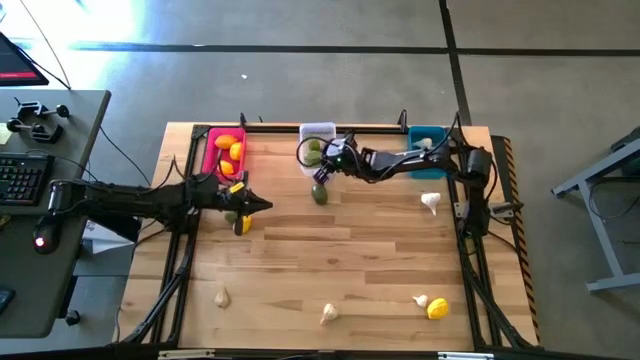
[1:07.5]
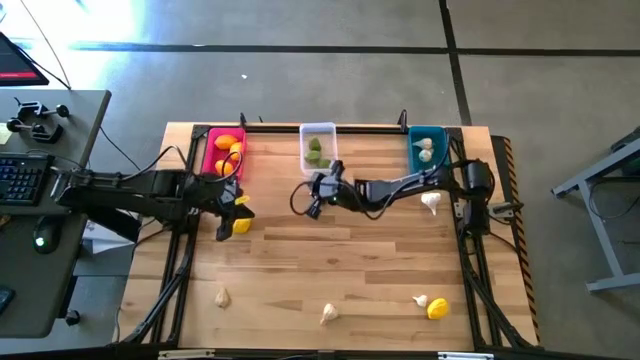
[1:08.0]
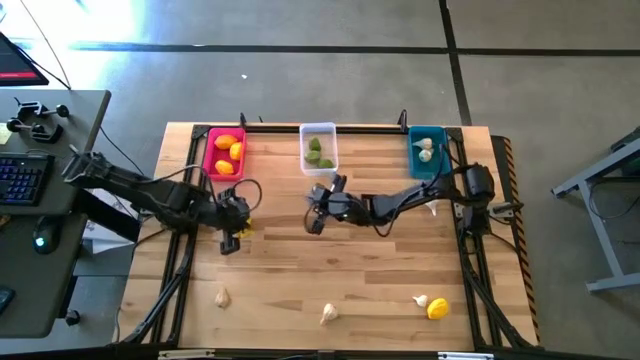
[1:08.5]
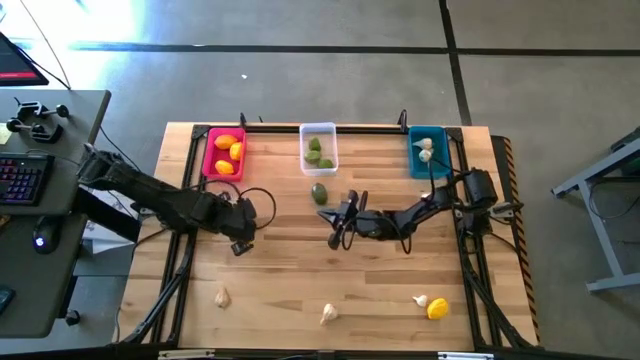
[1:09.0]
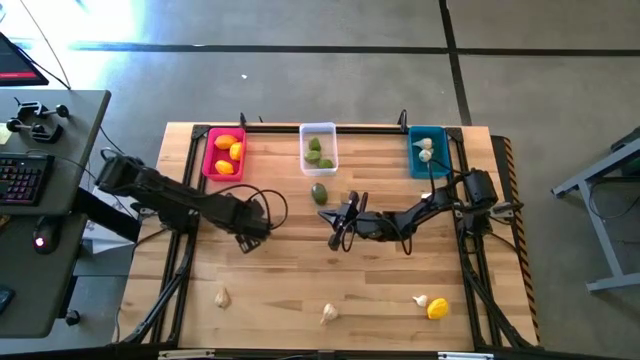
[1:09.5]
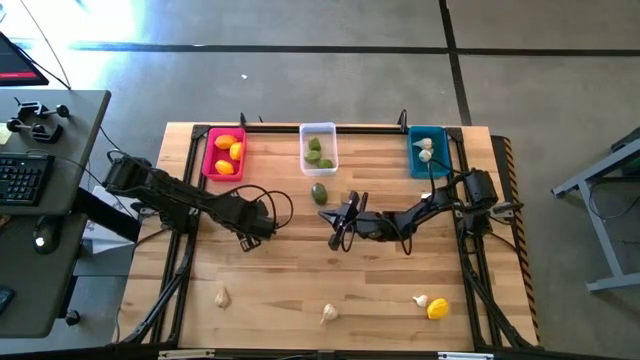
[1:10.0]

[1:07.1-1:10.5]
Task: Sort produce into baskets
Put the lemon into the pink bin

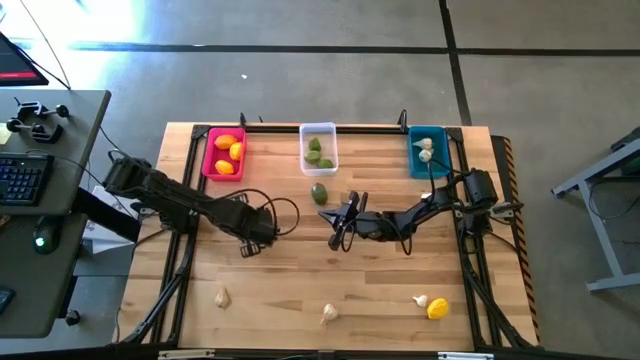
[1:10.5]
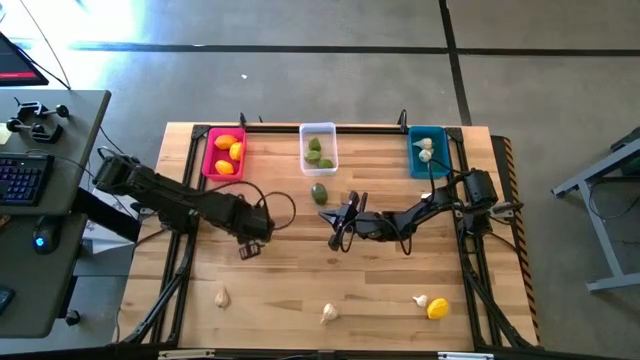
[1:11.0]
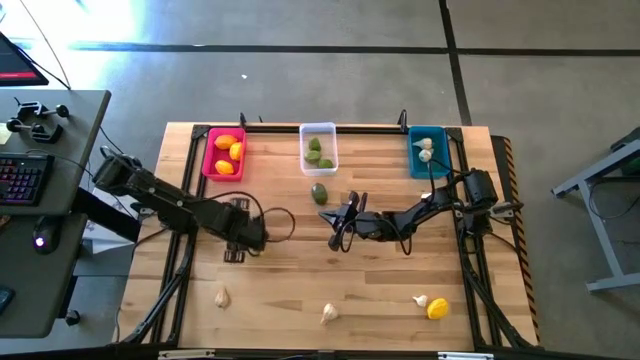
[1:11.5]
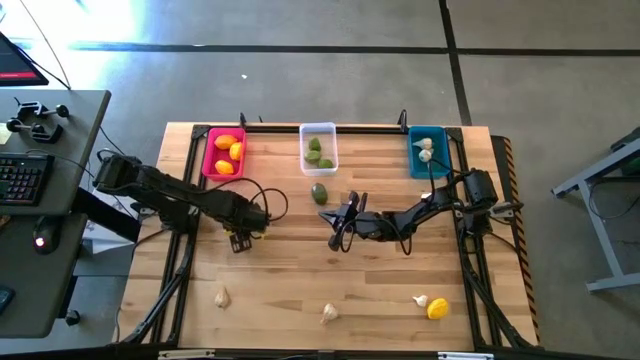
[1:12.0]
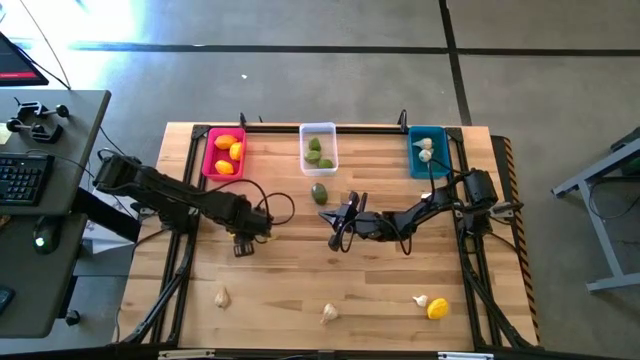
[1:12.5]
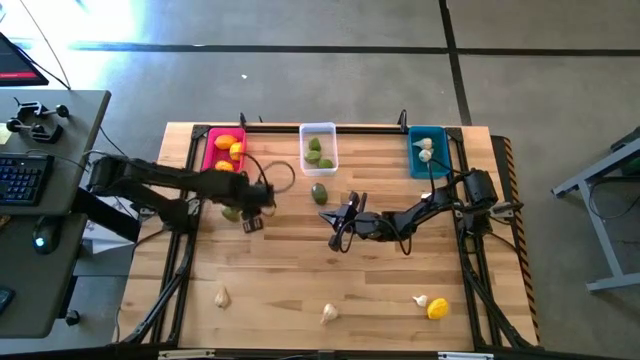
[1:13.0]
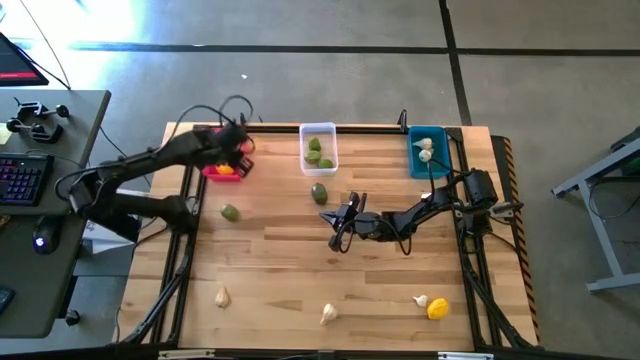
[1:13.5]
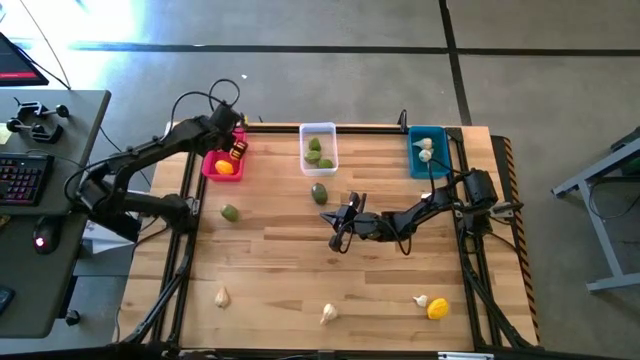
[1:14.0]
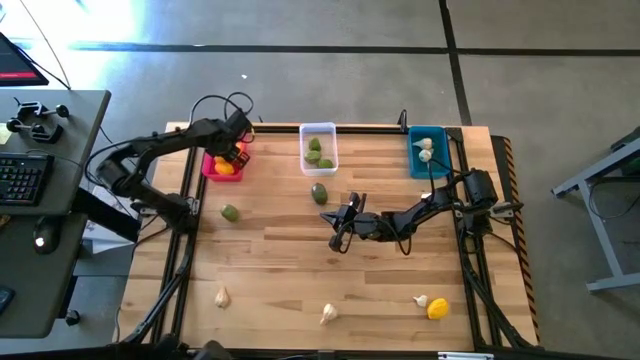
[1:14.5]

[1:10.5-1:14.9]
Put the lemon into the pink bin

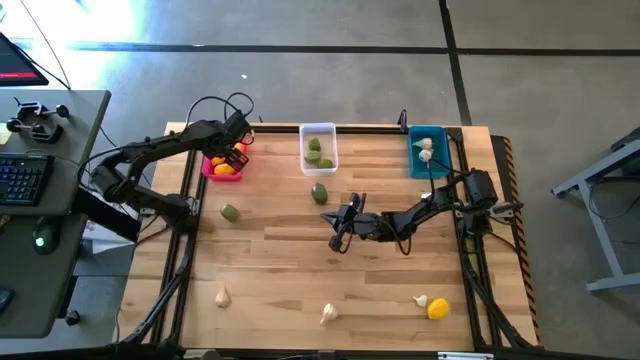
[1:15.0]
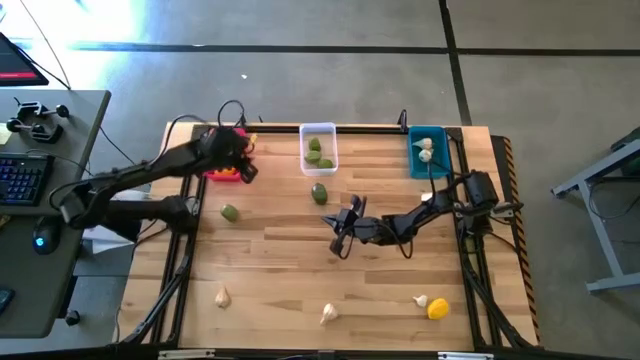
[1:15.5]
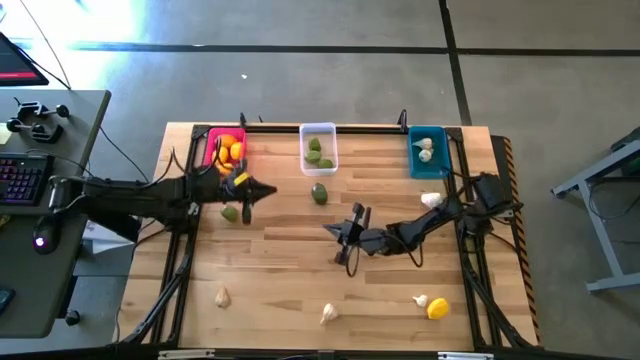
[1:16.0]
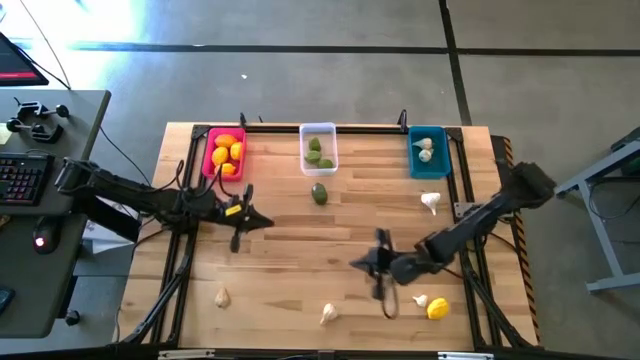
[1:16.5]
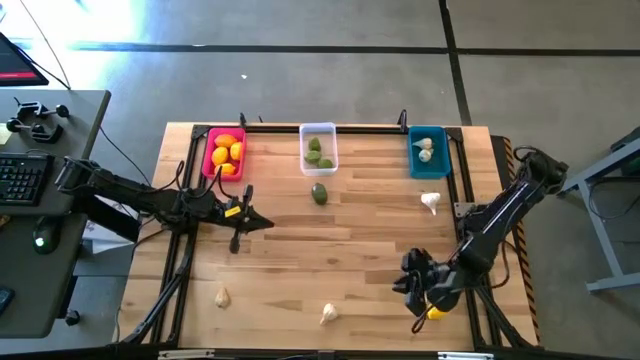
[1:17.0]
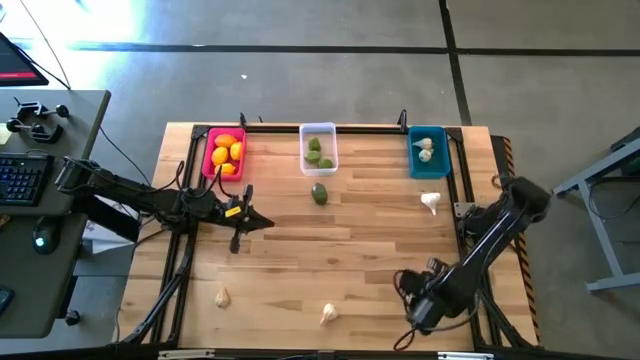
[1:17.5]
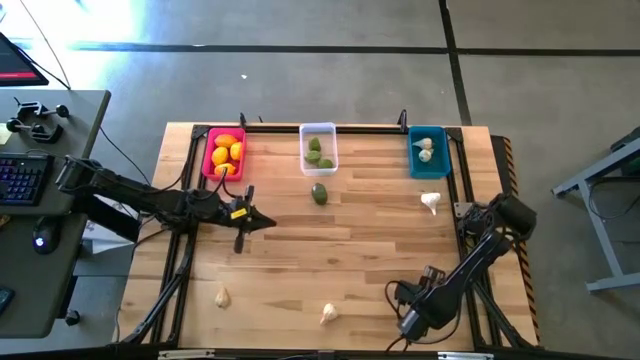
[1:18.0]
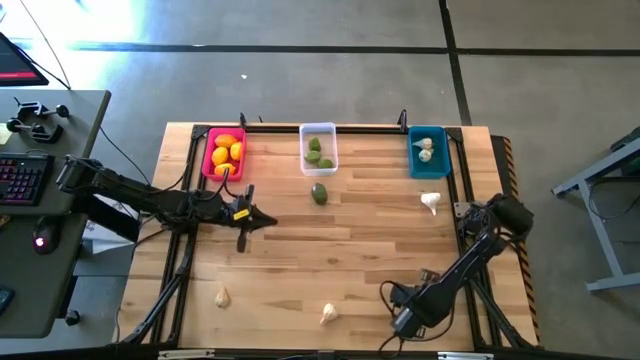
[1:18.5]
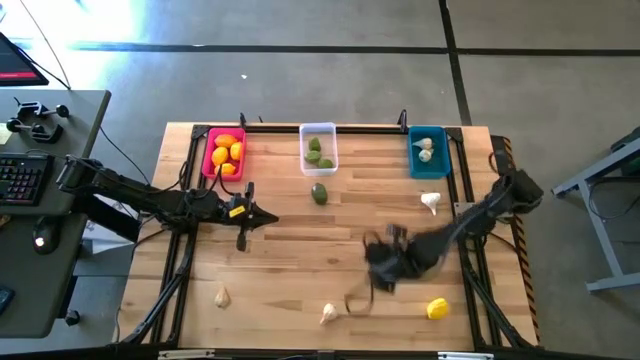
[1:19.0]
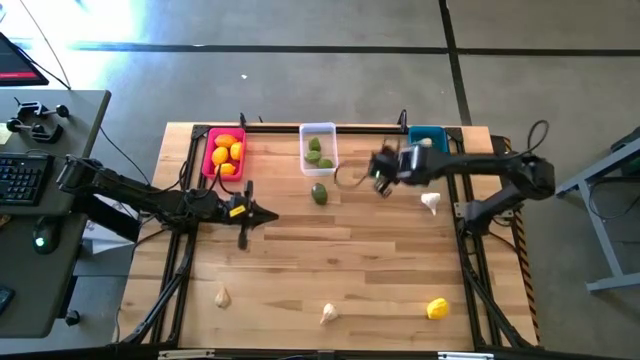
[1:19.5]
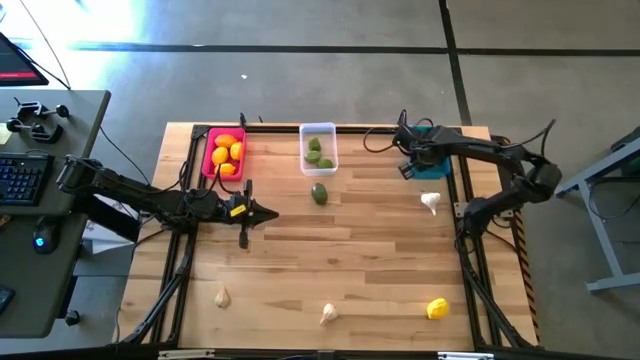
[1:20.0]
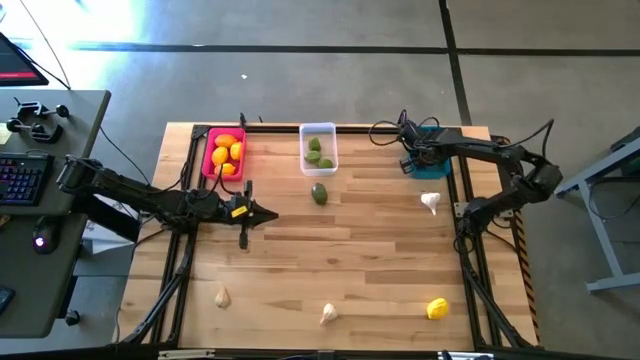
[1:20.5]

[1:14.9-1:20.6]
Put the garlic into the blue bin

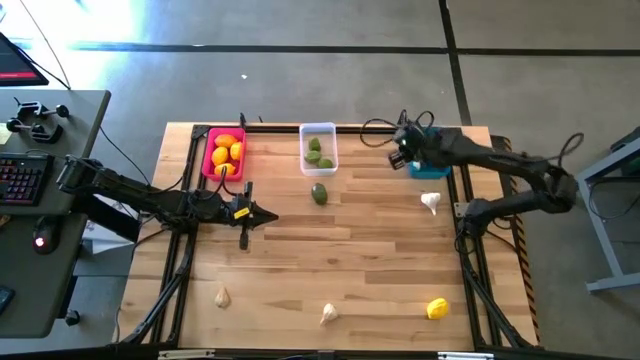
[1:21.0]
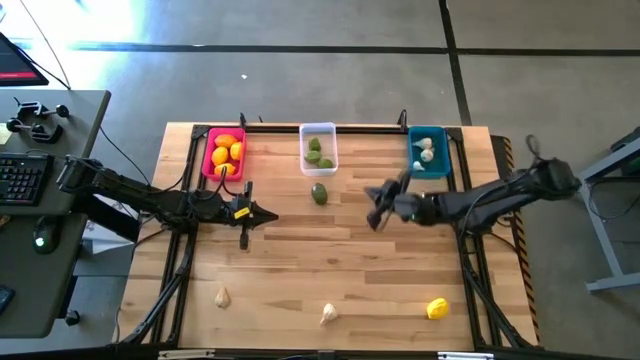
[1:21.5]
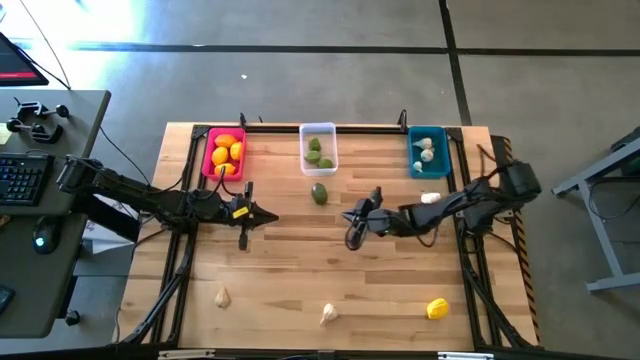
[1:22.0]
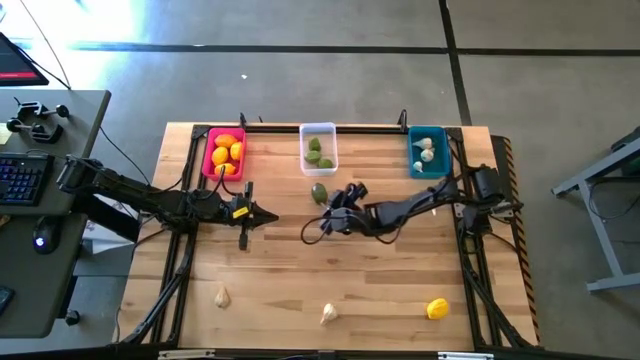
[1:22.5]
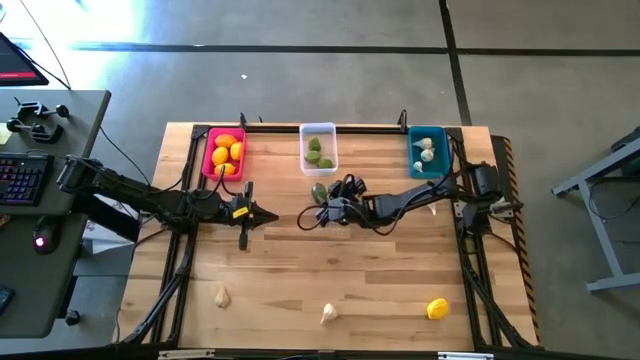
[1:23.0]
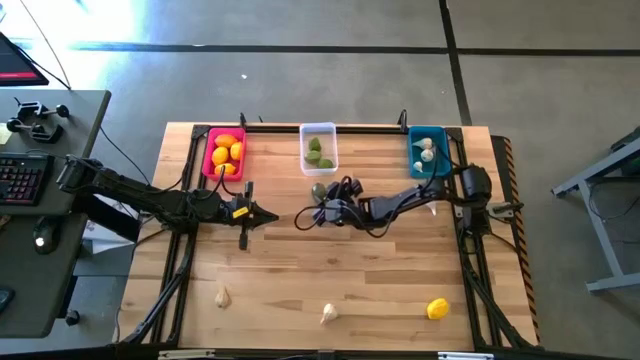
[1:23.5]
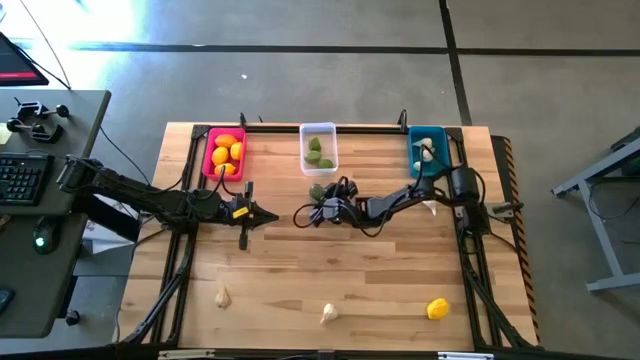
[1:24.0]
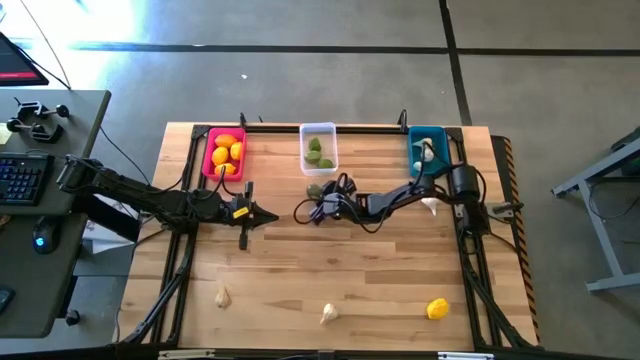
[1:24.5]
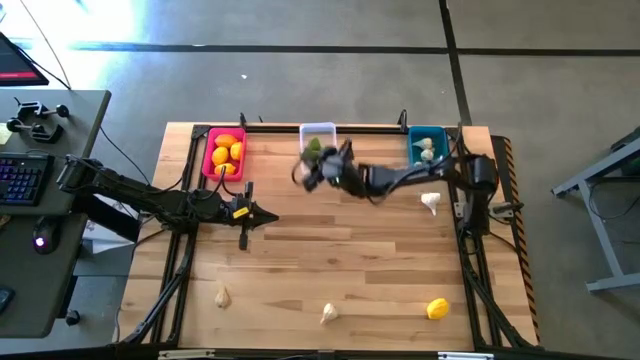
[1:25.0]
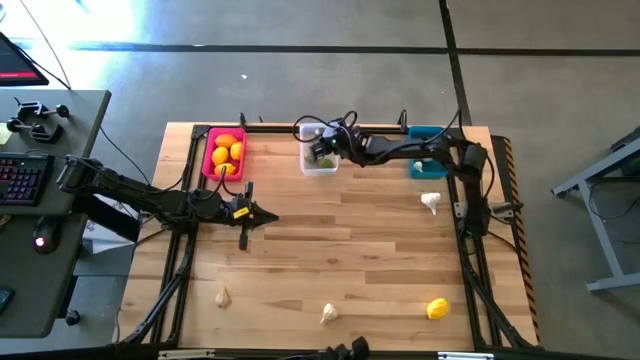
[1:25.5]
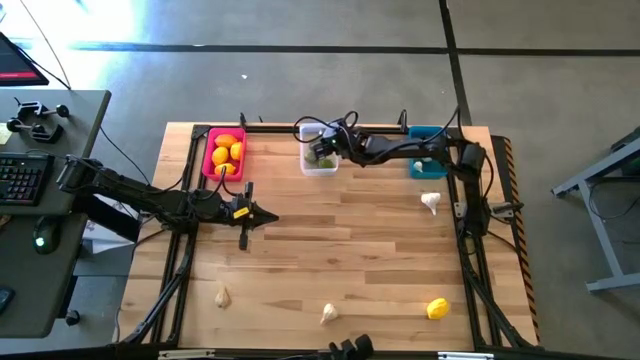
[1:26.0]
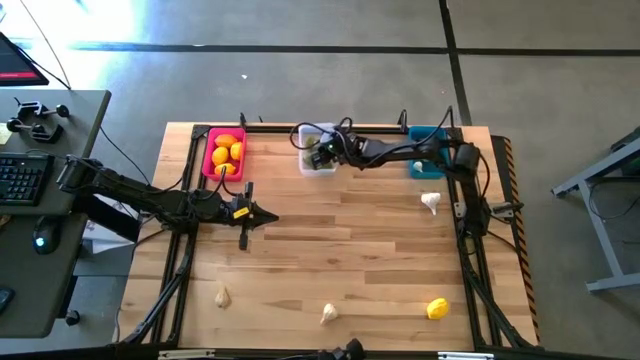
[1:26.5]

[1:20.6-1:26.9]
Put the lime into the white bin

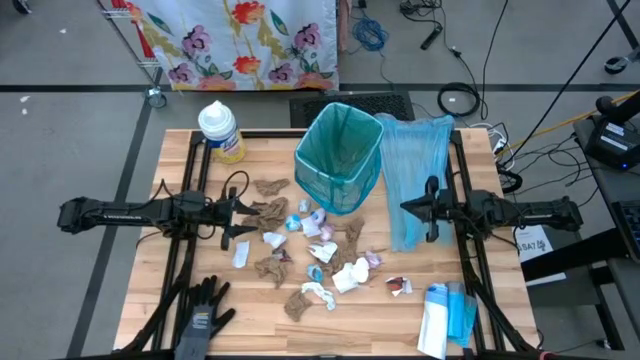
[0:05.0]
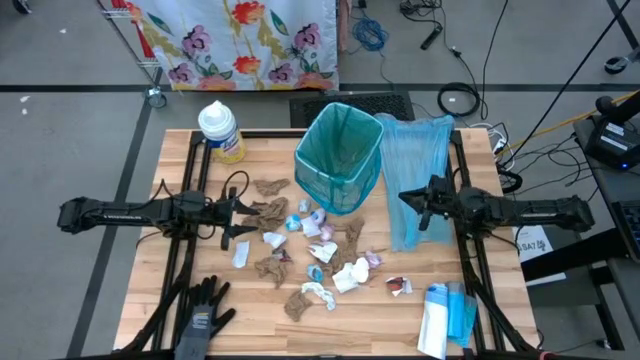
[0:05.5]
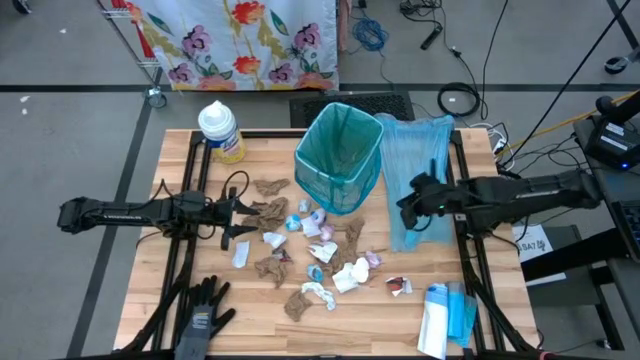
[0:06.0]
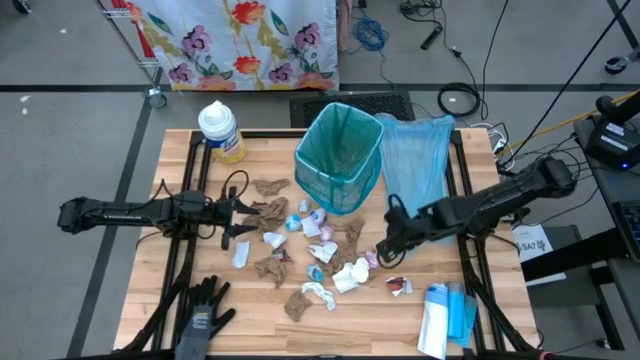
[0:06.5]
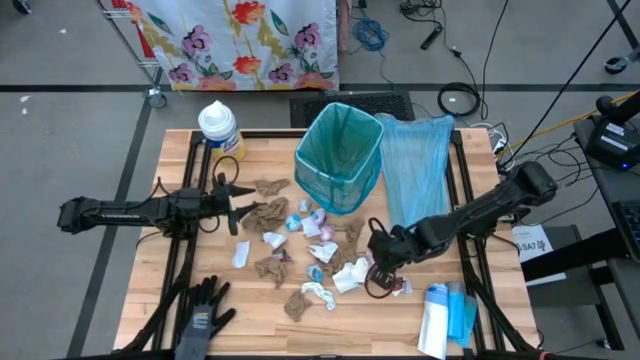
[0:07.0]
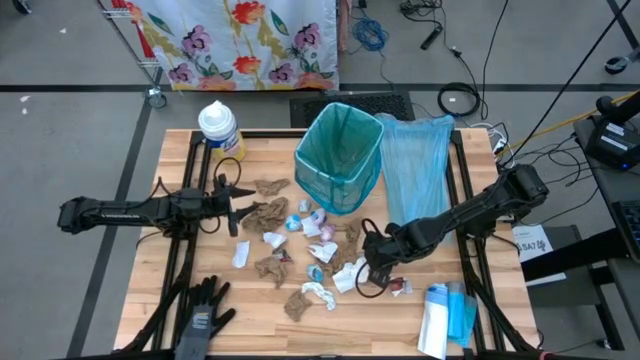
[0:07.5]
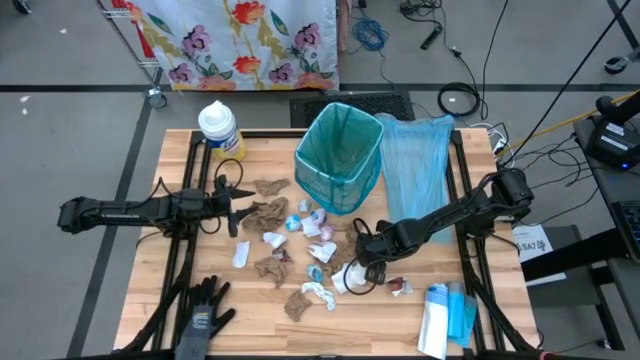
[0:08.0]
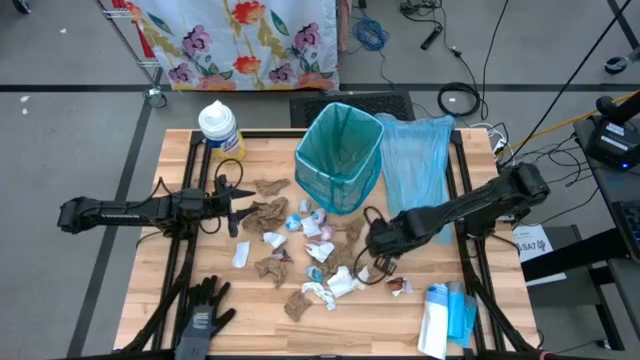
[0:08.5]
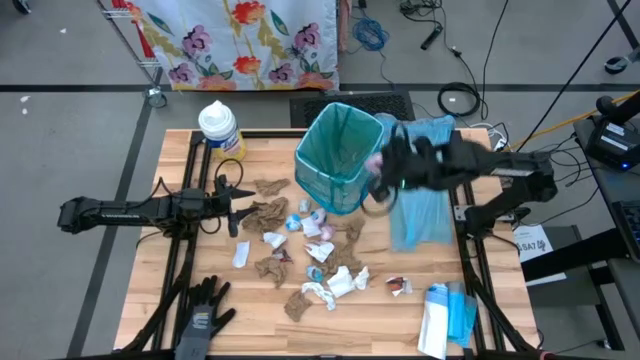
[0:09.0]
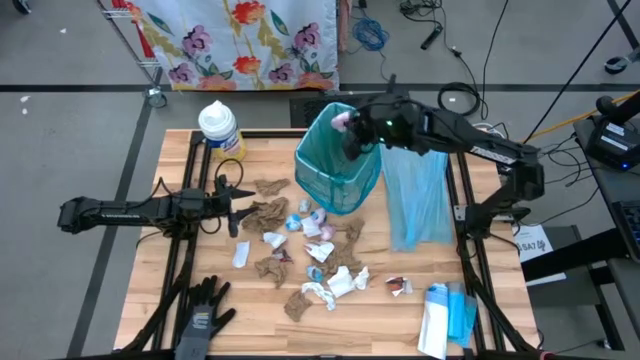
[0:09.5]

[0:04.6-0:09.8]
Task: place trash/remove bag and relplace
Put the bottom pink plastic into the trash bin
